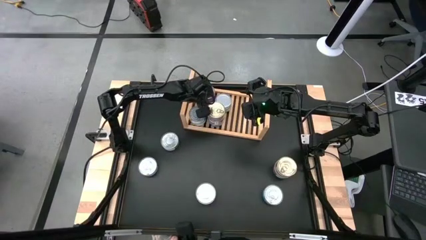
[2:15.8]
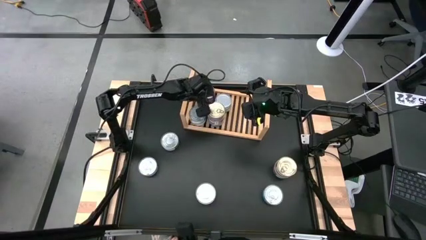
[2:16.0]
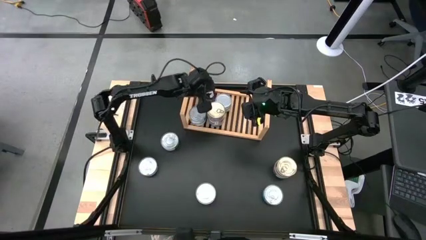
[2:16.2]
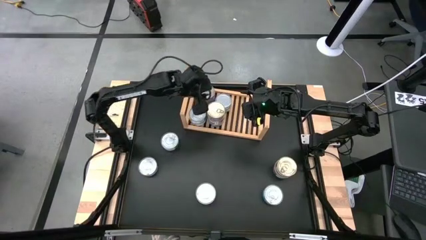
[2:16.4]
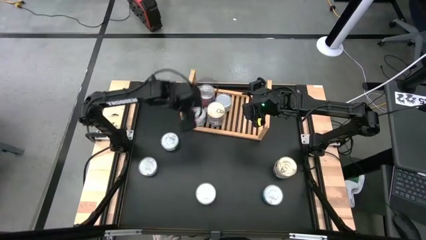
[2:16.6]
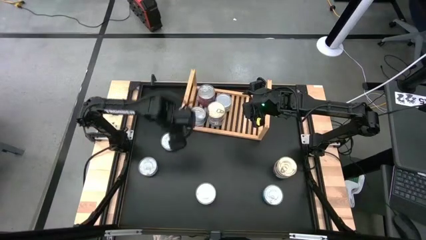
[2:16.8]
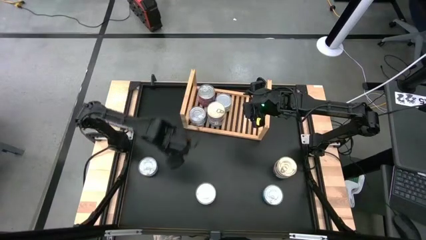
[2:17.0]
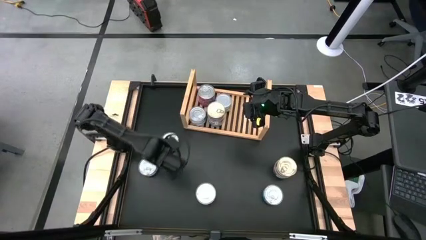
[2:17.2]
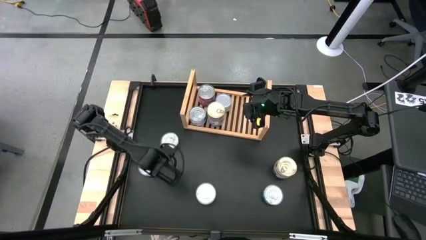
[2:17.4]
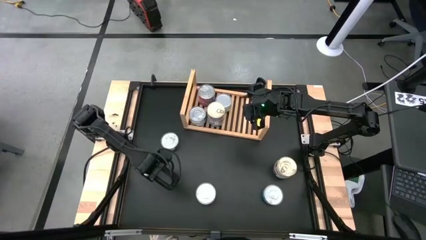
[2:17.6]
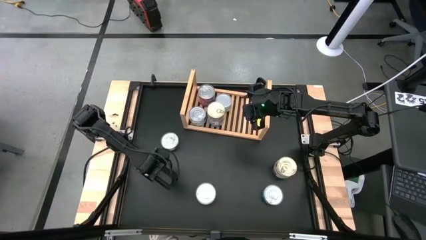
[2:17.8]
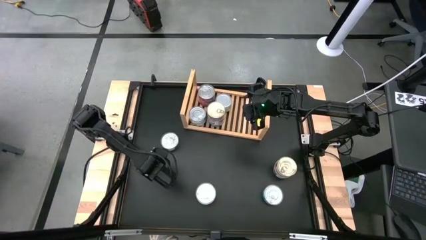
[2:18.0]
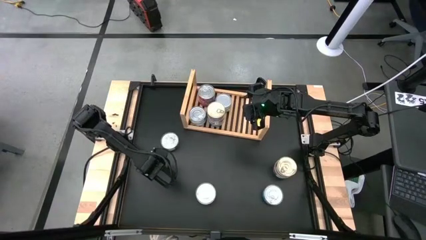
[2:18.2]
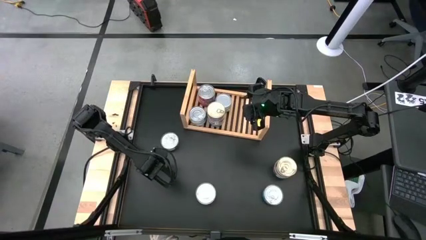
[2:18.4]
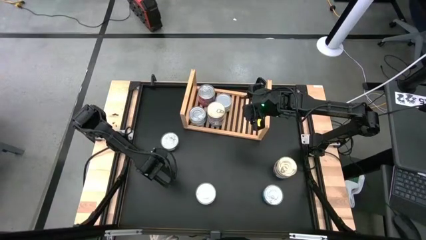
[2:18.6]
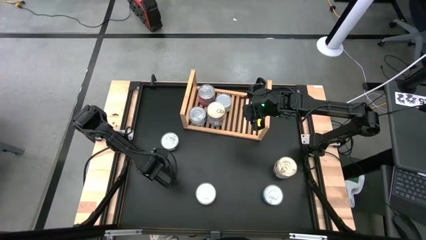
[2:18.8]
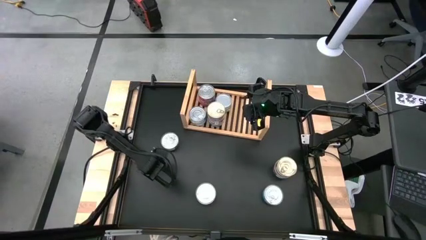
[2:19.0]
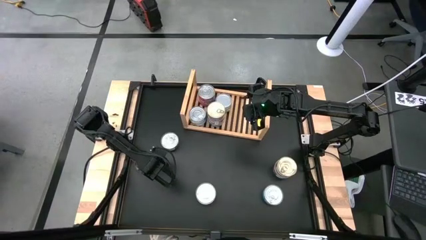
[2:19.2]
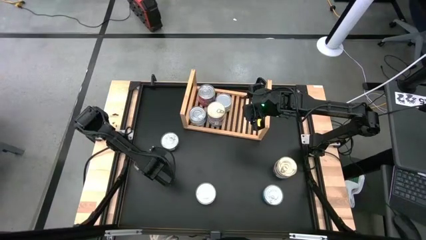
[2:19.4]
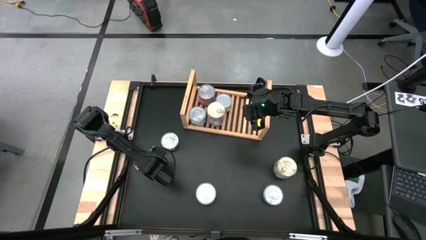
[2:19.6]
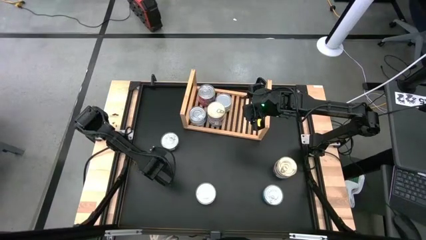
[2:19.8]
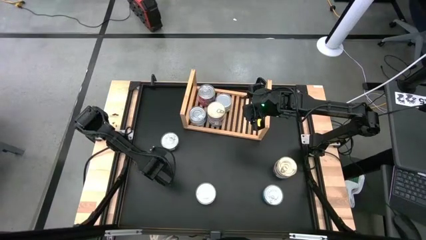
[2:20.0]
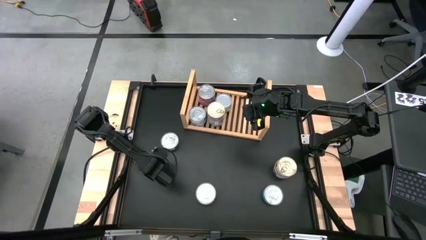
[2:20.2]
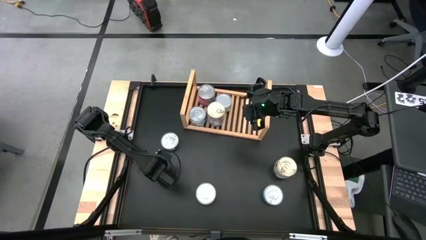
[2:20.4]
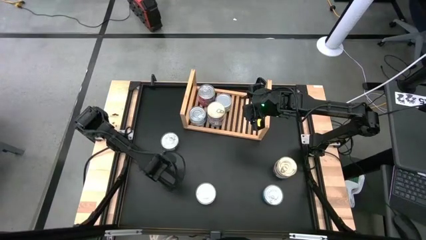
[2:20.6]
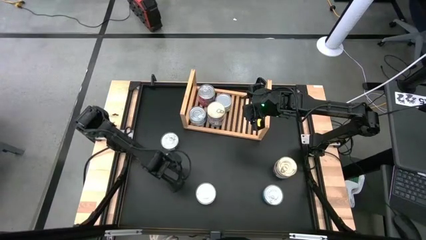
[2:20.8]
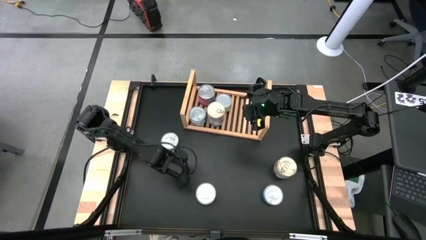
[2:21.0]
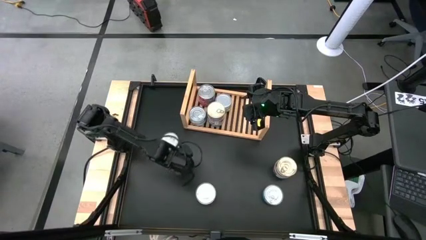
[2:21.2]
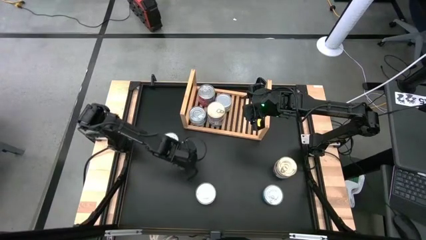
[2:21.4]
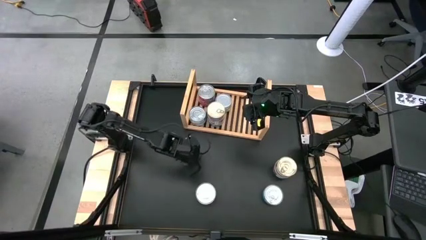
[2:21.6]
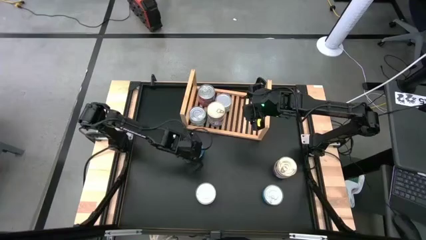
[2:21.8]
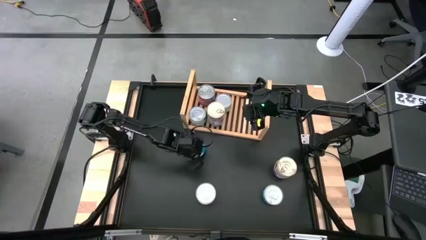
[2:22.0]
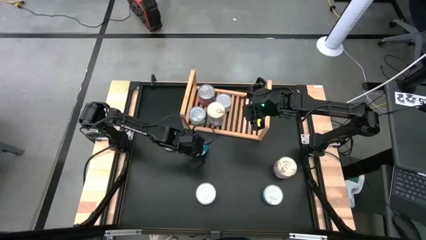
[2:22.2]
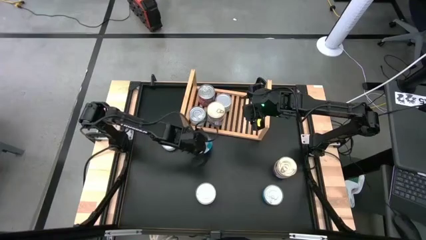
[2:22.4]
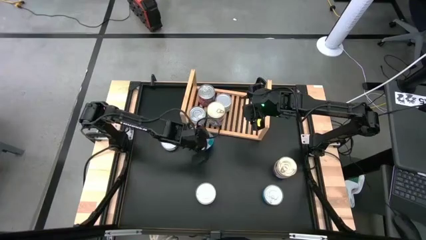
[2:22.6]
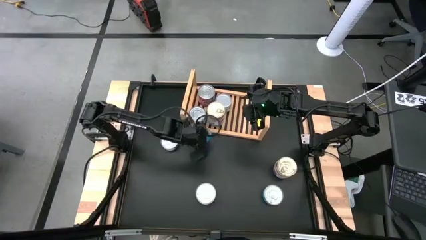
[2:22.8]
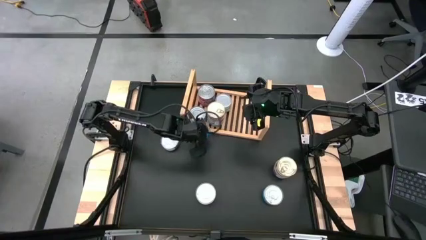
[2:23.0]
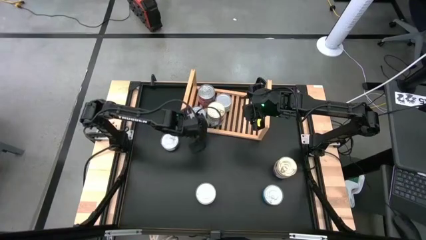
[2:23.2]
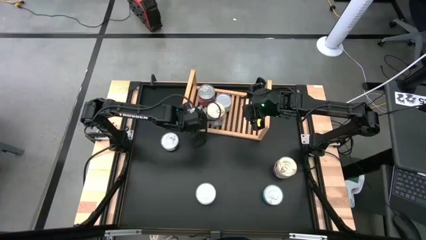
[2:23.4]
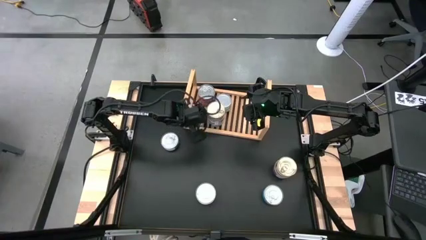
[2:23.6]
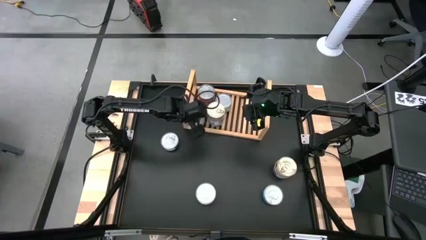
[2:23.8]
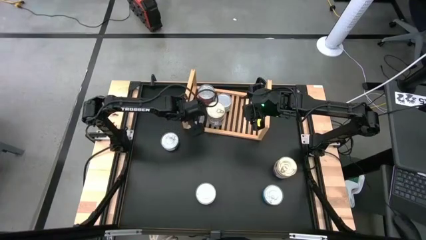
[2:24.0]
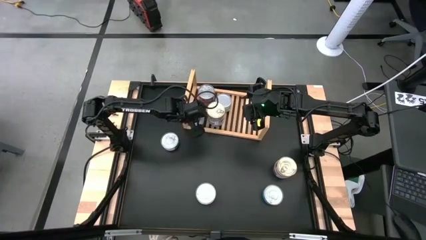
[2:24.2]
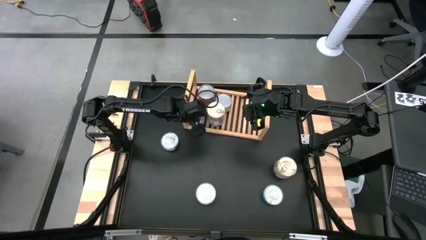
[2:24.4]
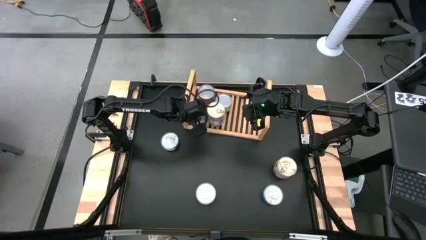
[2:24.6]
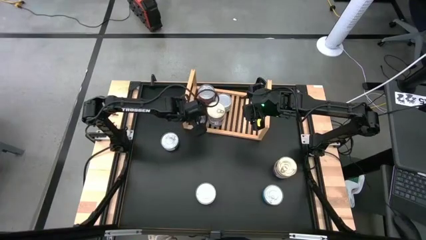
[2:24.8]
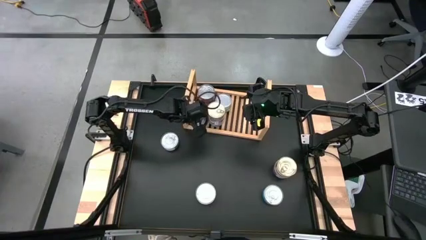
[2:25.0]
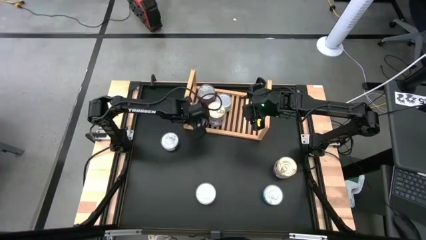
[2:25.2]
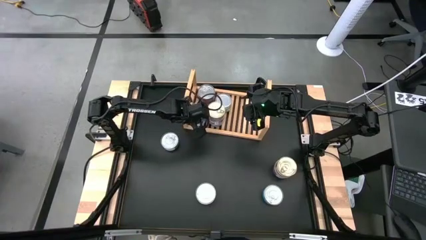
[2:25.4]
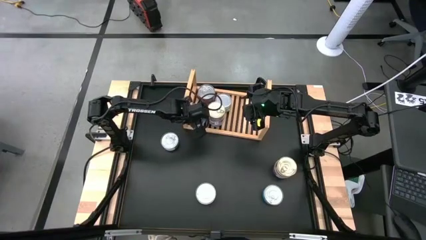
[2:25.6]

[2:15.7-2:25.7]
Task: Stack canned seafood by type on shelf
Stack the light blue tuna can on top of the other light blue tuna can on the shelf

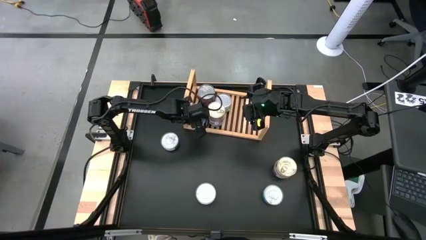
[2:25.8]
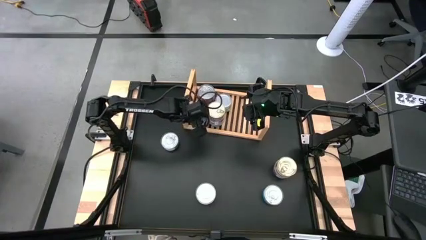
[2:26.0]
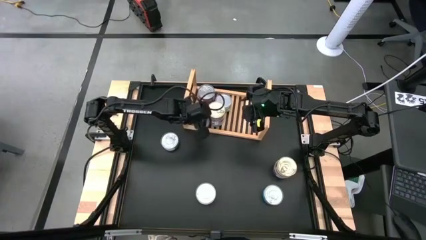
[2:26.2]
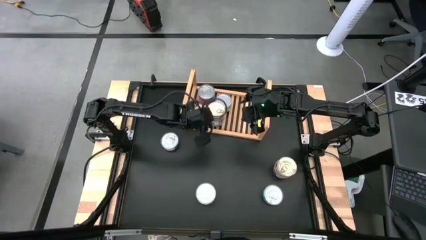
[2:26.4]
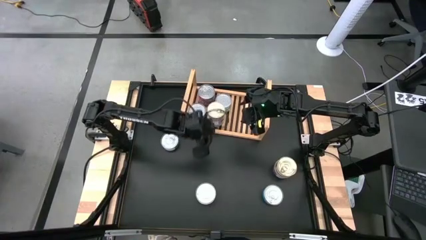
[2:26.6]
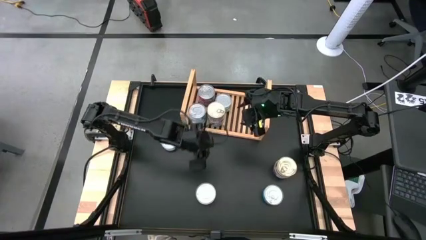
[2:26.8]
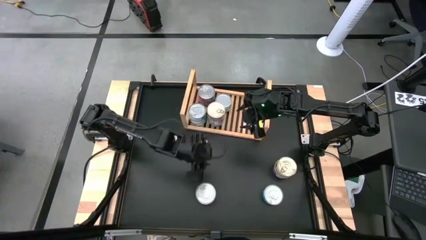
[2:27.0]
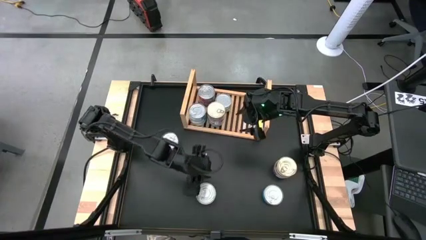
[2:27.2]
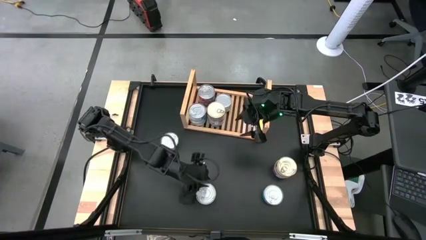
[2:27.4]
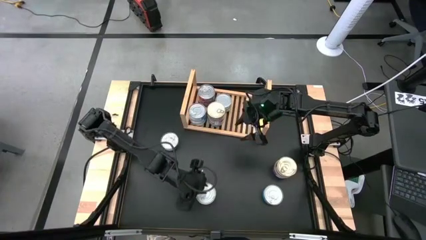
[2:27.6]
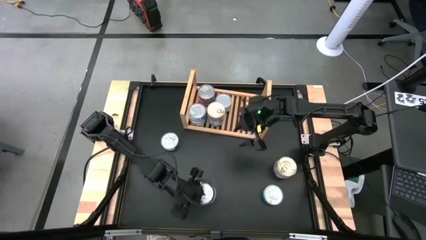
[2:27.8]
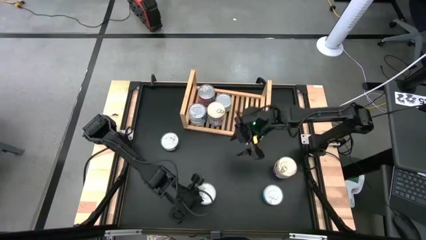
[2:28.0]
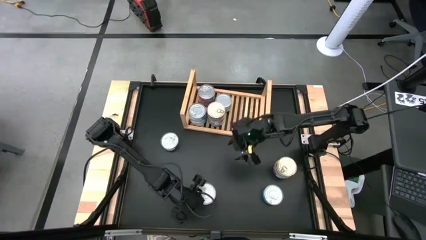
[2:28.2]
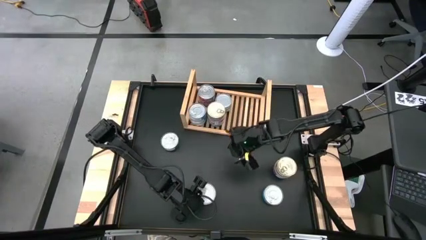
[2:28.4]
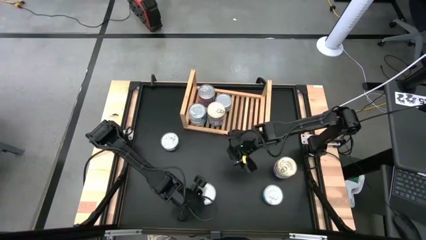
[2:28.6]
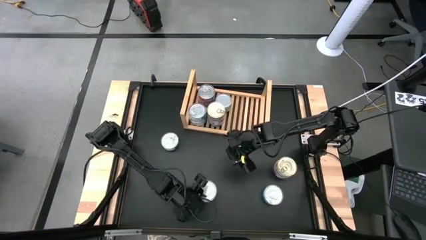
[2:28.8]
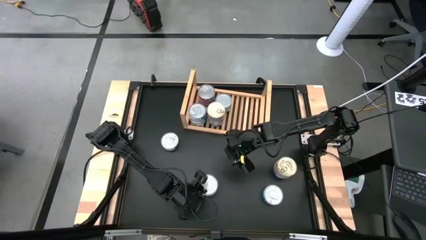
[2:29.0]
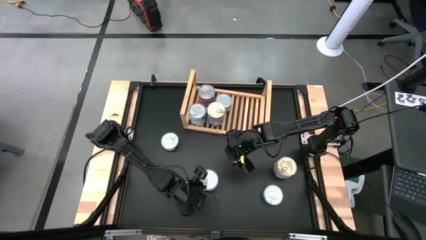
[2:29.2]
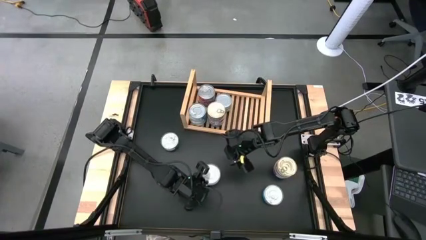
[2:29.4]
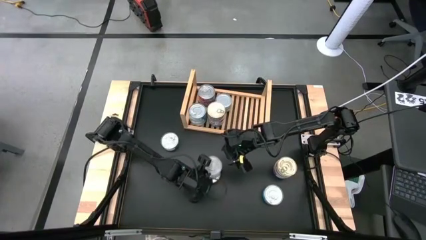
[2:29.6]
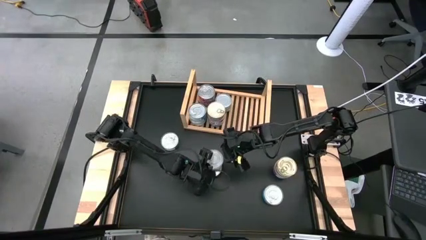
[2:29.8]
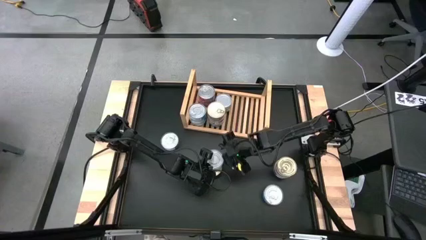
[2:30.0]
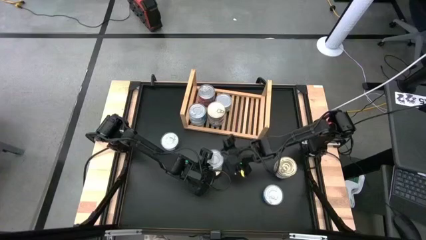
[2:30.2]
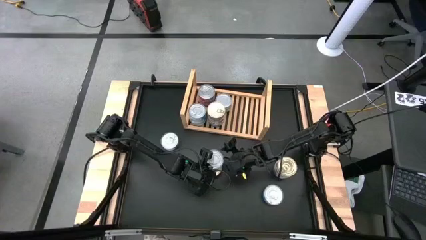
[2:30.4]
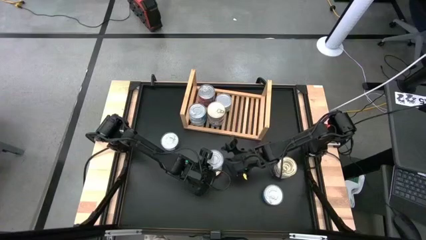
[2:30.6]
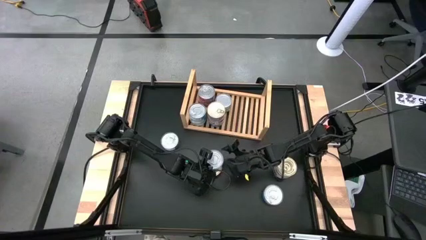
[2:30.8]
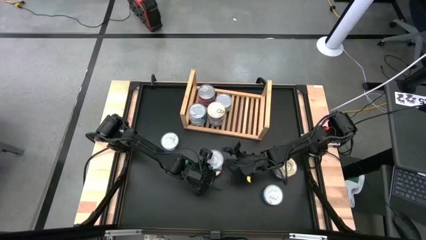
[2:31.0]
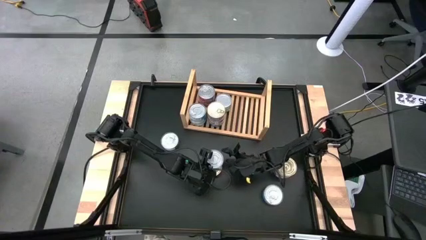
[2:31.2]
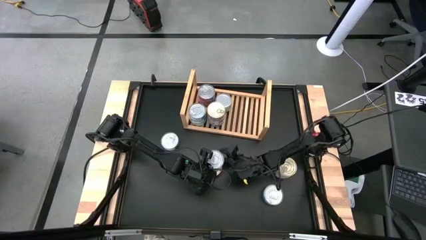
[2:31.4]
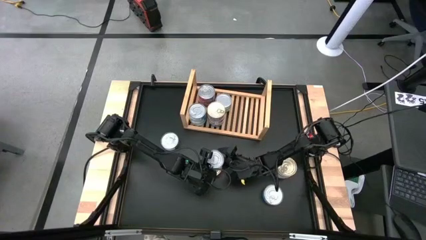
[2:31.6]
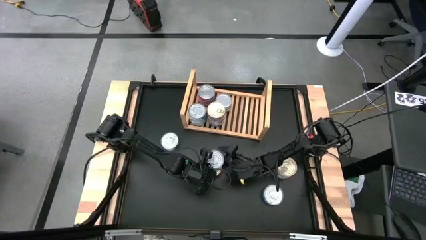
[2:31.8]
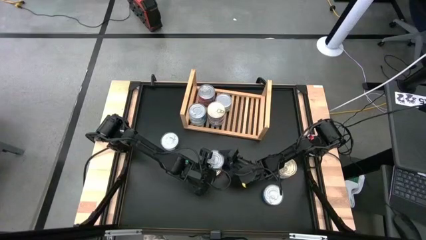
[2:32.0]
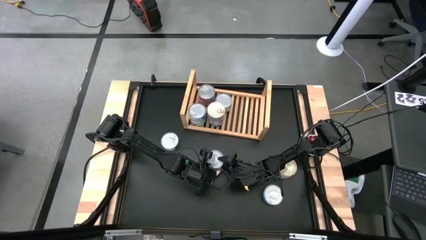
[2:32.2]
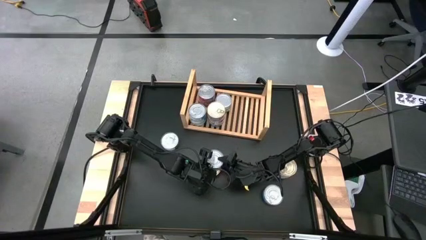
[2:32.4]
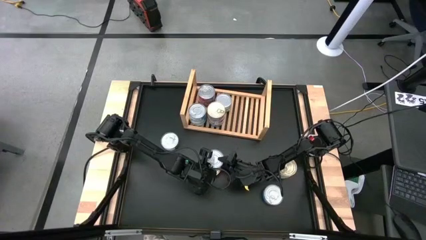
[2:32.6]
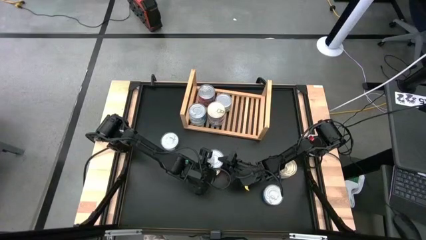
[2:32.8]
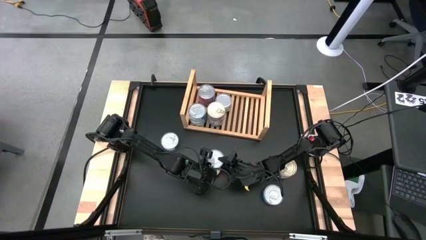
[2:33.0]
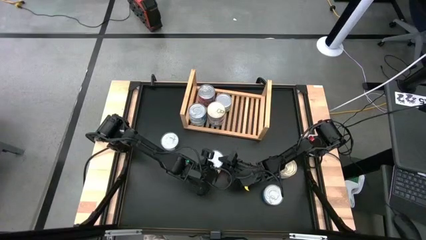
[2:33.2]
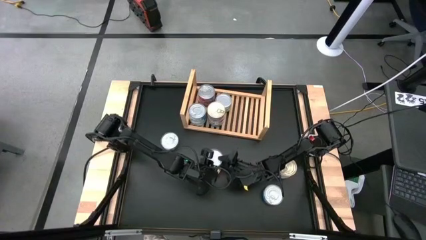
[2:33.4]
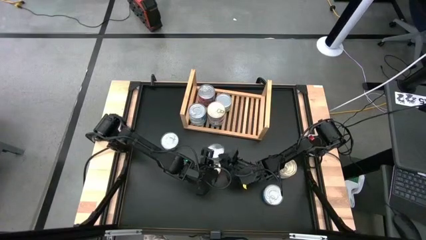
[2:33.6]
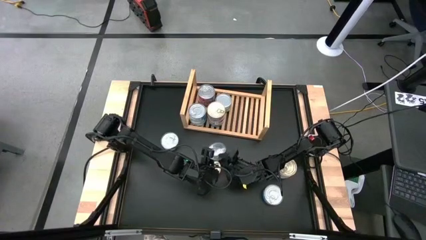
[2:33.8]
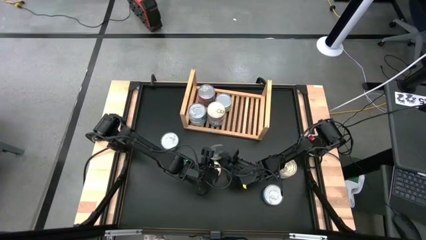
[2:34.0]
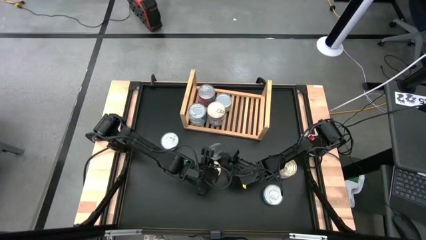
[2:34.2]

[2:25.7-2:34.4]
Put the green tuna can on the shelf
